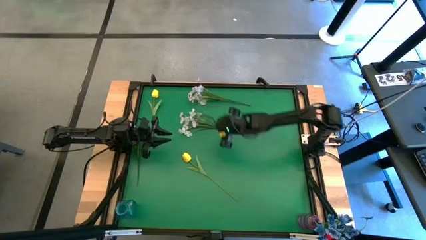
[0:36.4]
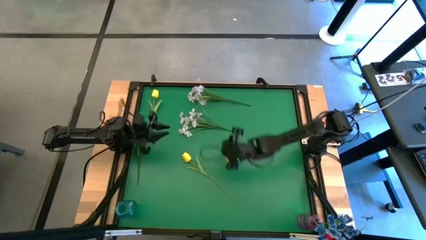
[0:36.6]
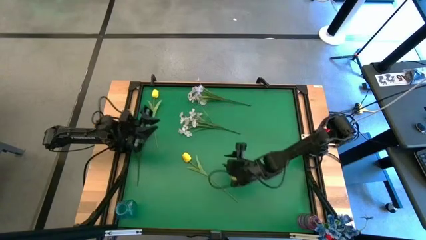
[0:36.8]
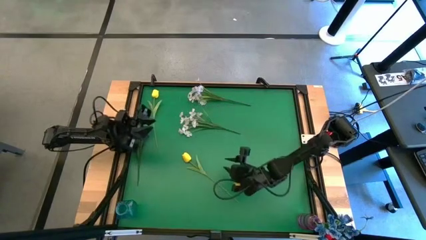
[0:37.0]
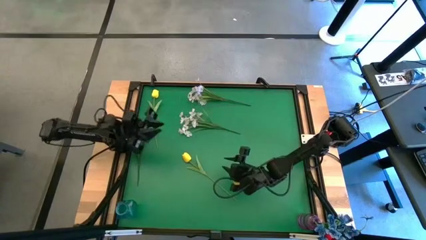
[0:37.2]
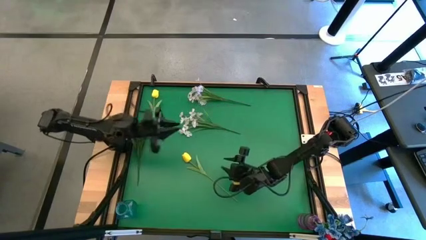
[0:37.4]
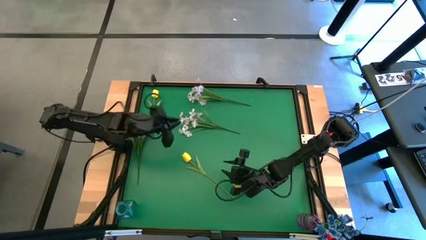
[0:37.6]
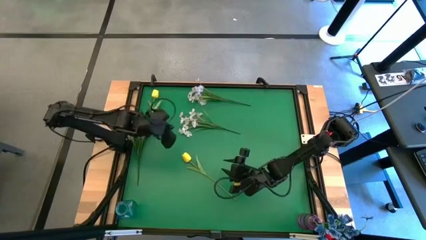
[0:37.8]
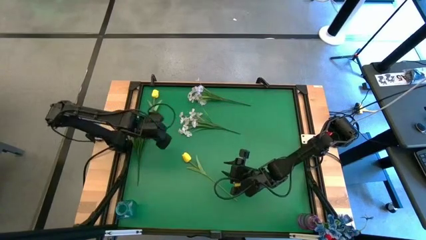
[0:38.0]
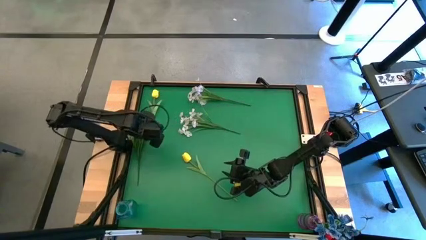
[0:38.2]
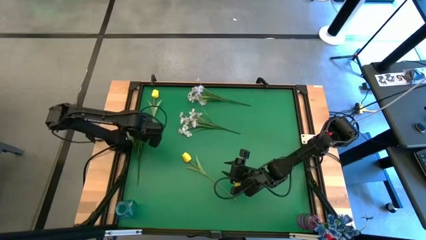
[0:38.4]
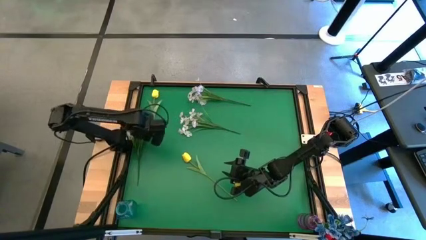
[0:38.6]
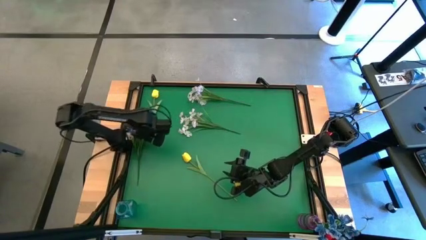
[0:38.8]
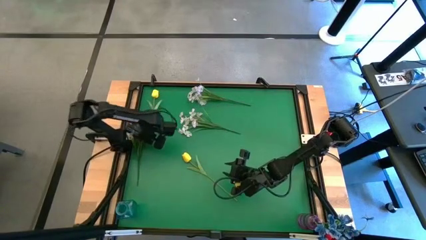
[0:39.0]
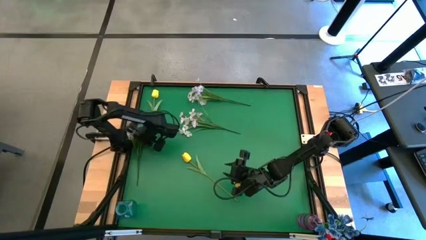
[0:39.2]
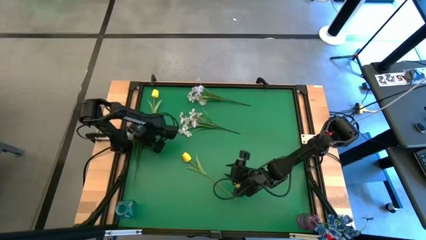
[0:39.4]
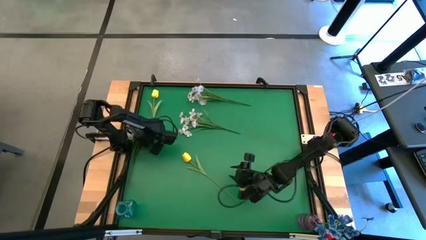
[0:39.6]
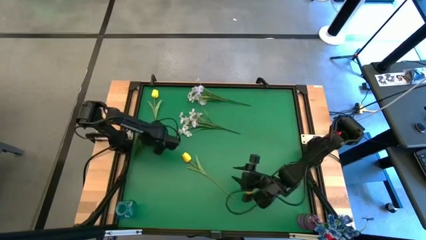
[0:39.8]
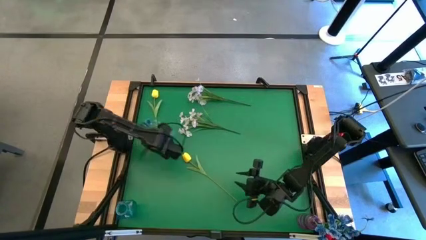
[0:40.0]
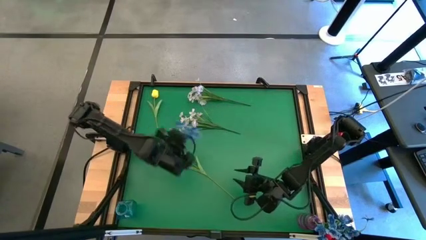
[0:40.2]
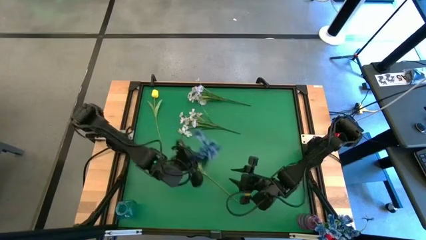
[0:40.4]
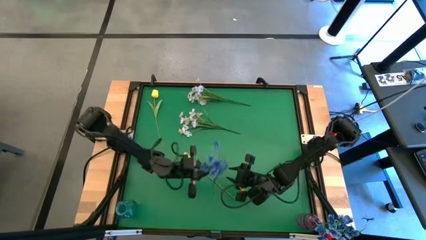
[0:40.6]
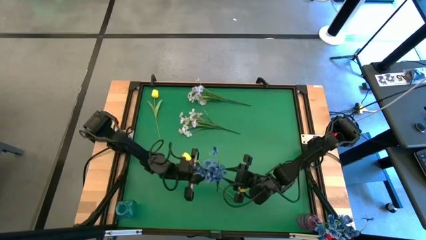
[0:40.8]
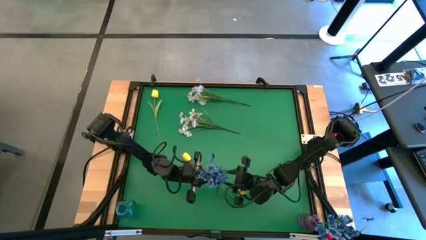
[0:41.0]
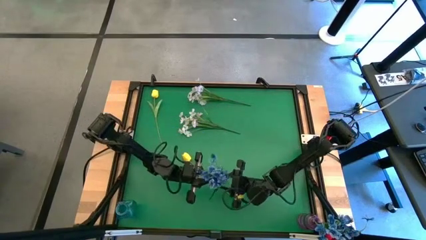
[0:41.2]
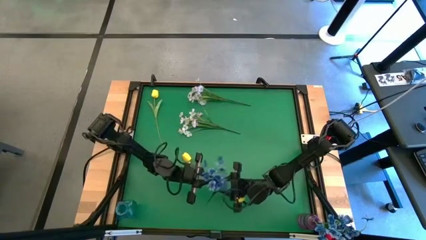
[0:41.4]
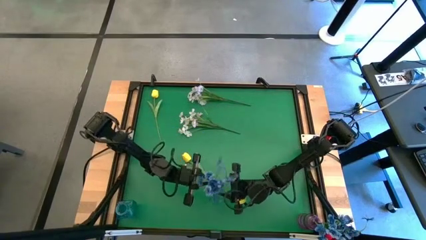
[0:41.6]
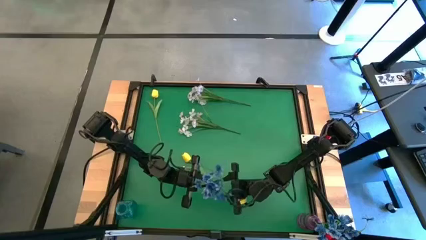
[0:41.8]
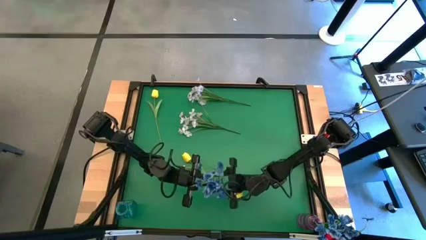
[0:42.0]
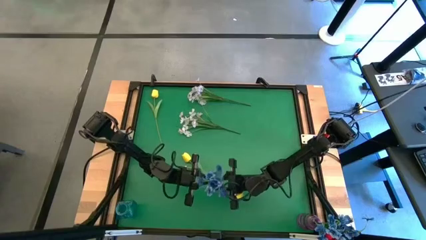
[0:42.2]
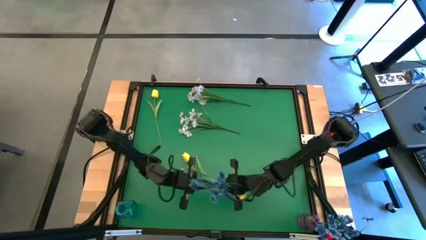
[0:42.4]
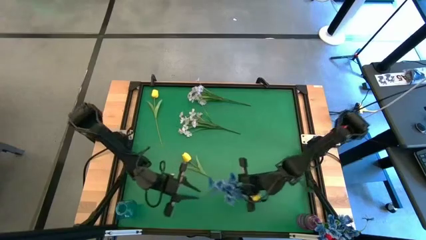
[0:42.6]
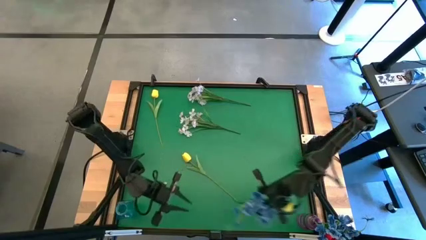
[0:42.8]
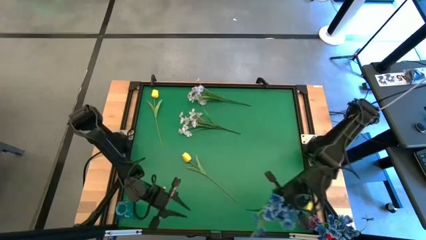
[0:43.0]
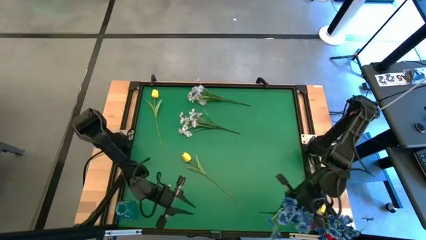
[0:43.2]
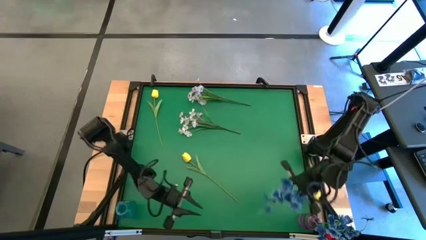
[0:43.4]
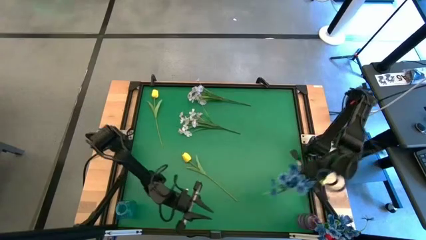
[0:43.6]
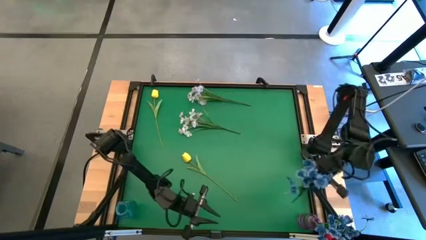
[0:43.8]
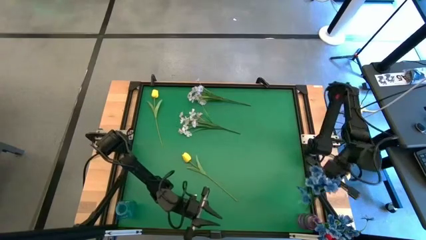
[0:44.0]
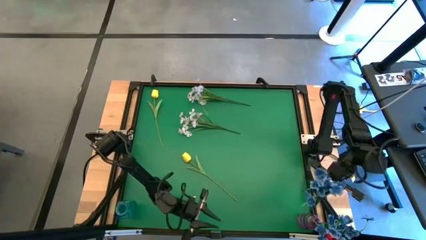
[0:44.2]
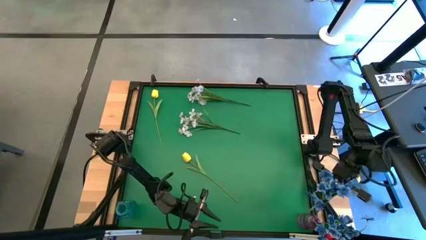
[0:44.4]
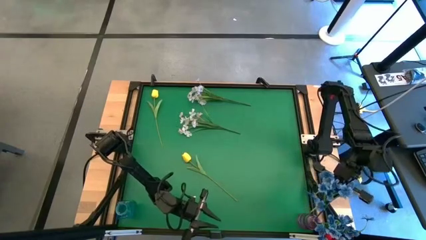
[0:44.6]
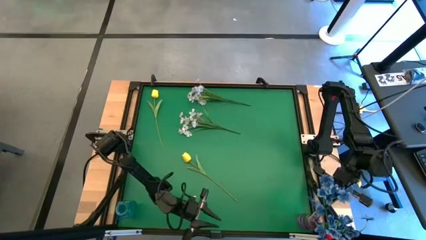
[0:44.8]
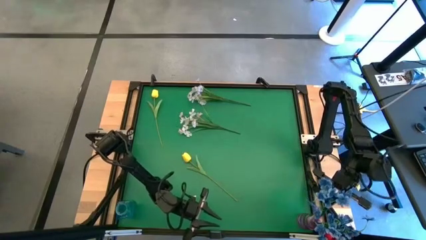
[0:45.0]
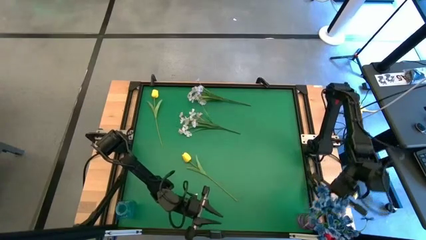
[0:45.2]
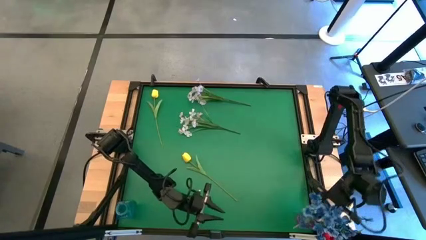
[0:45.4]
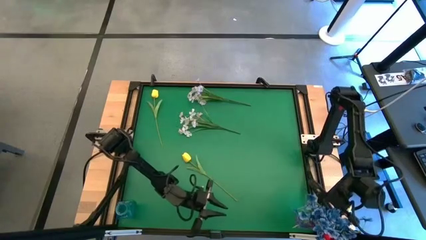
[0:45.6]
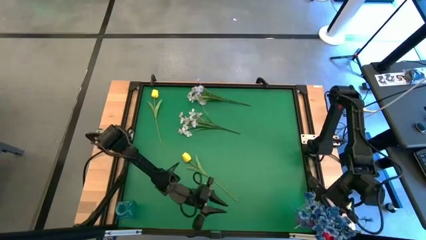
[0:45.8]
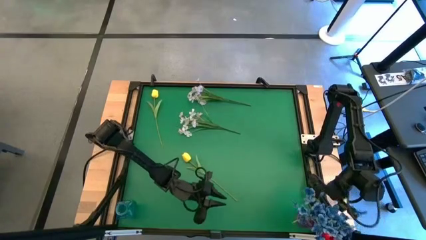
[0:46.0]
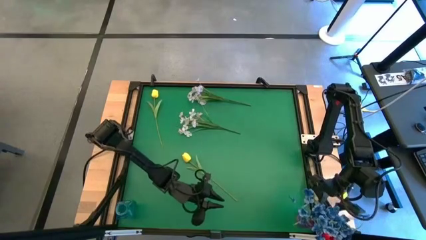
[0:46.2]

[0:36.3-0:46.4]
Task: Sort flowers into vase by color
Put the blue flowers into the purple vase
